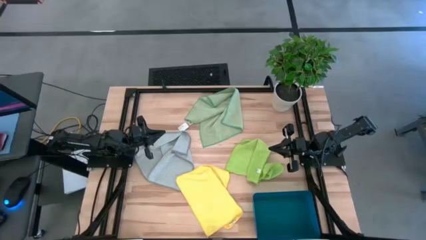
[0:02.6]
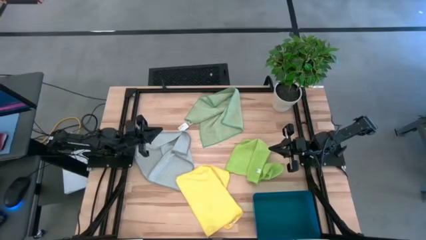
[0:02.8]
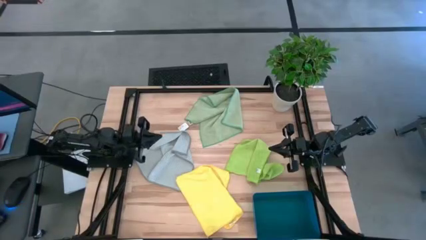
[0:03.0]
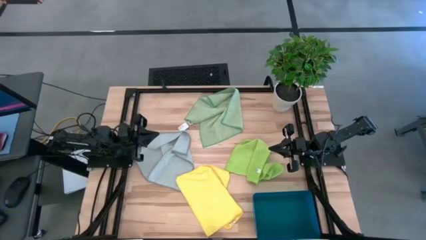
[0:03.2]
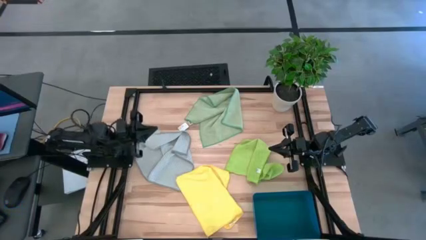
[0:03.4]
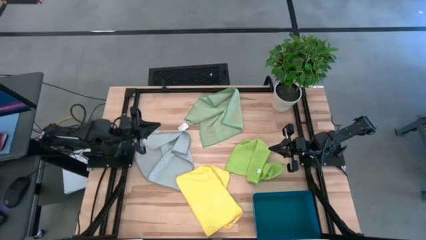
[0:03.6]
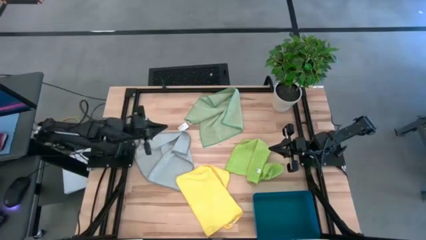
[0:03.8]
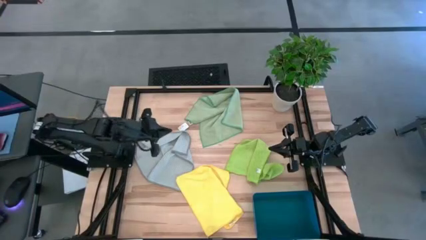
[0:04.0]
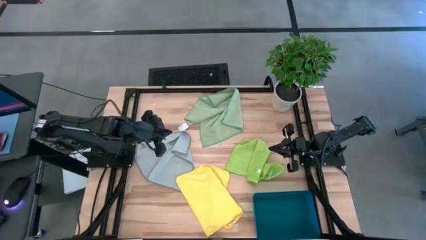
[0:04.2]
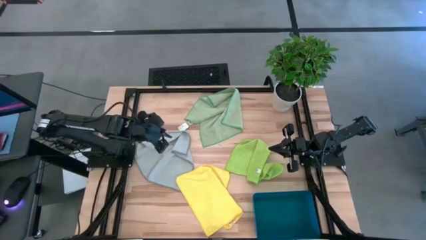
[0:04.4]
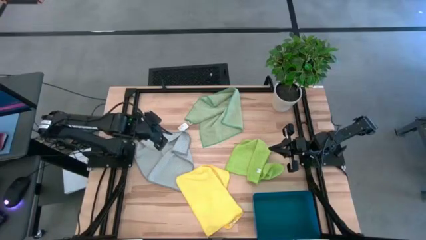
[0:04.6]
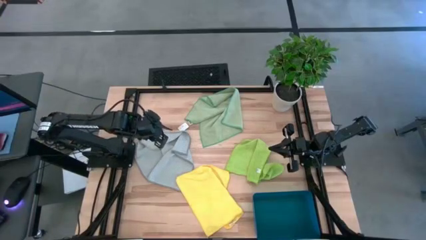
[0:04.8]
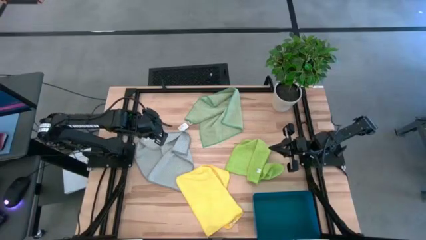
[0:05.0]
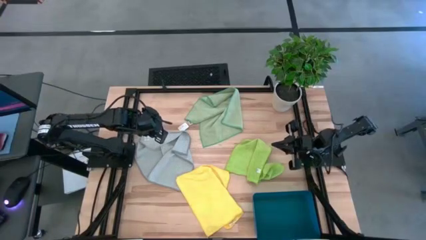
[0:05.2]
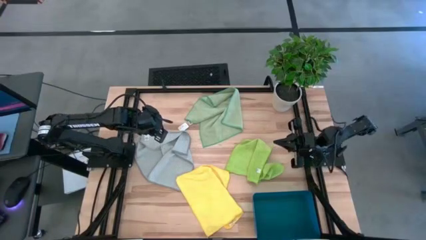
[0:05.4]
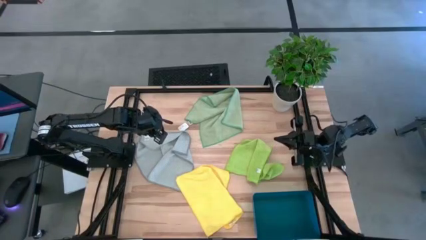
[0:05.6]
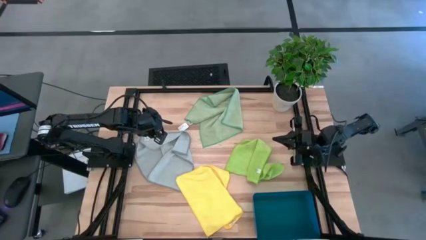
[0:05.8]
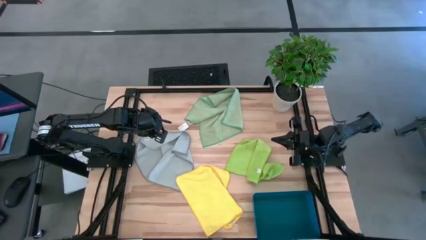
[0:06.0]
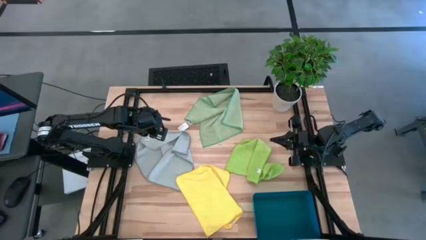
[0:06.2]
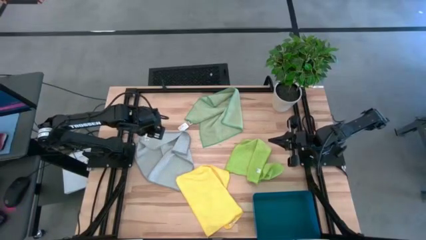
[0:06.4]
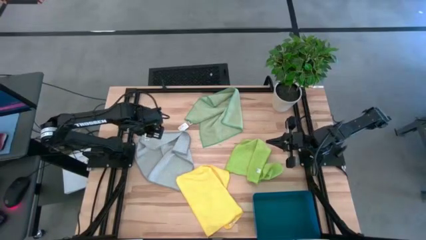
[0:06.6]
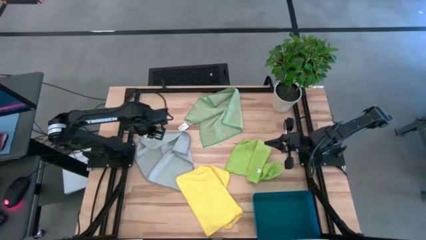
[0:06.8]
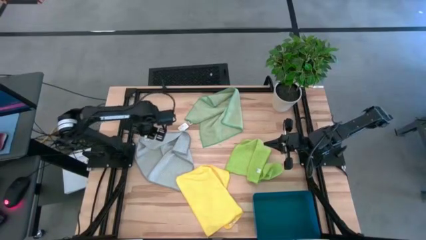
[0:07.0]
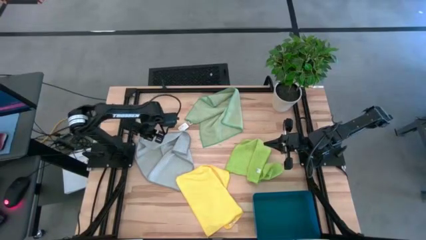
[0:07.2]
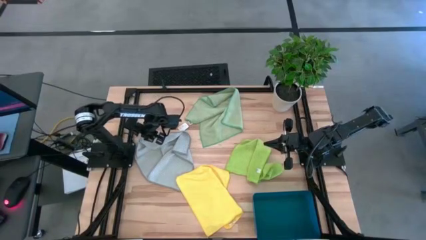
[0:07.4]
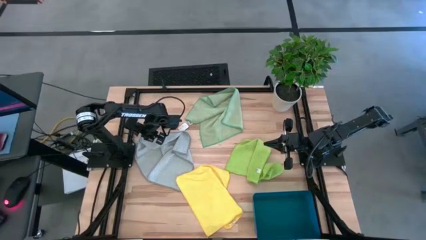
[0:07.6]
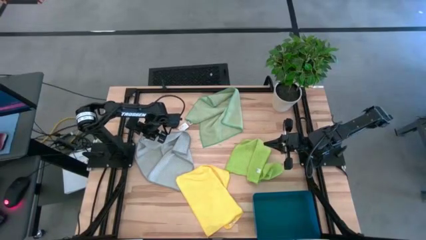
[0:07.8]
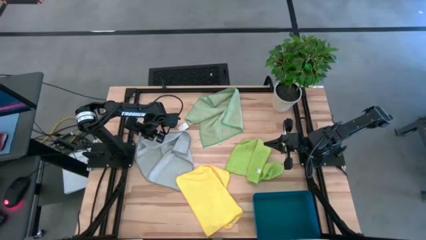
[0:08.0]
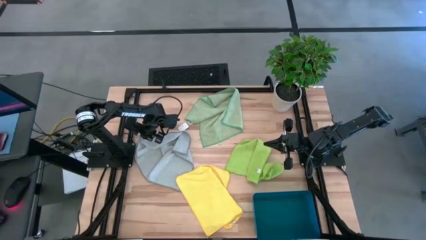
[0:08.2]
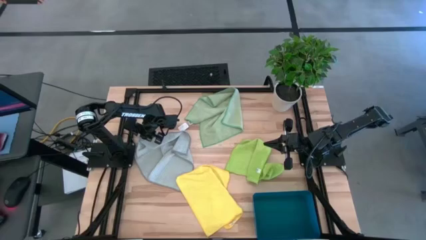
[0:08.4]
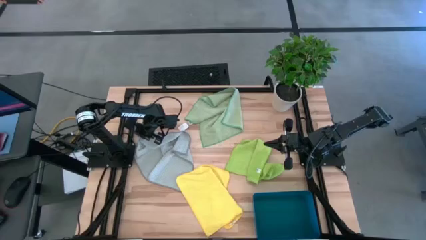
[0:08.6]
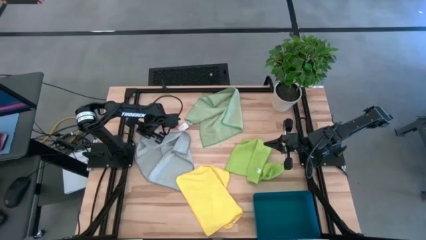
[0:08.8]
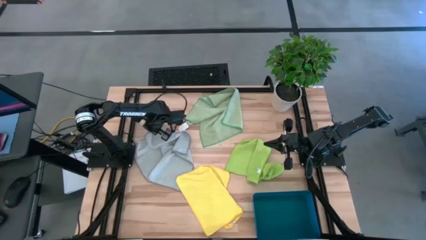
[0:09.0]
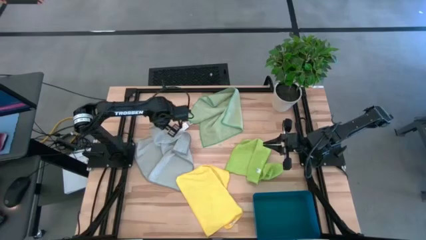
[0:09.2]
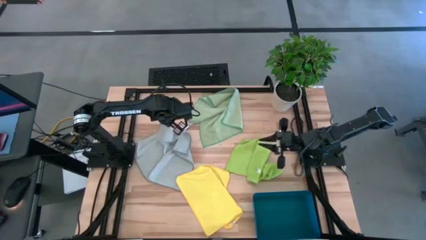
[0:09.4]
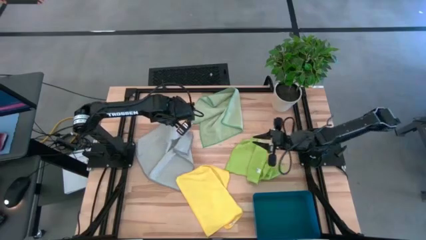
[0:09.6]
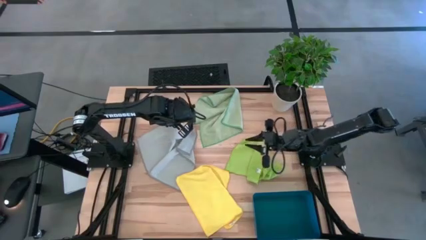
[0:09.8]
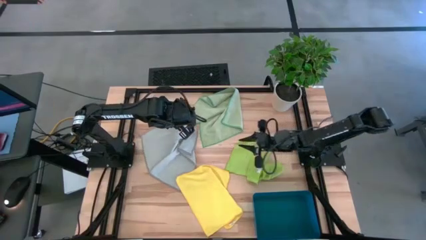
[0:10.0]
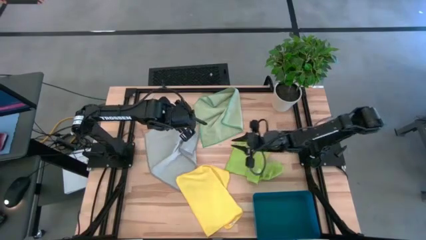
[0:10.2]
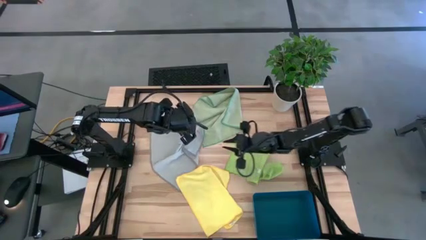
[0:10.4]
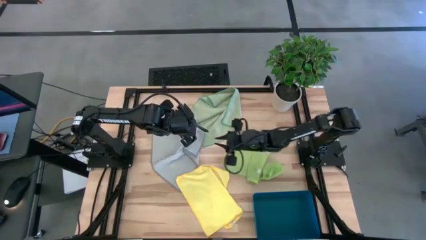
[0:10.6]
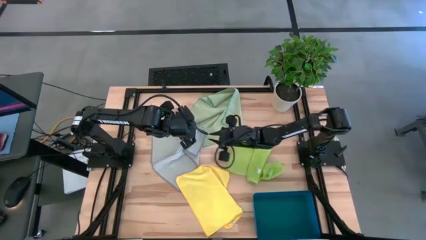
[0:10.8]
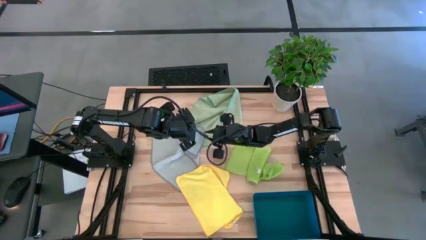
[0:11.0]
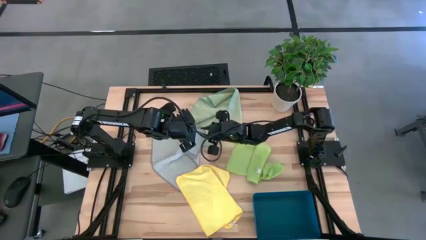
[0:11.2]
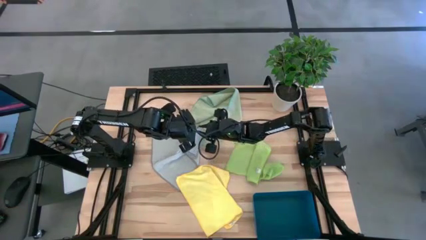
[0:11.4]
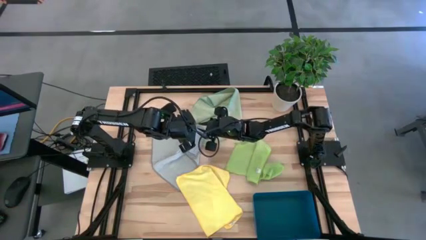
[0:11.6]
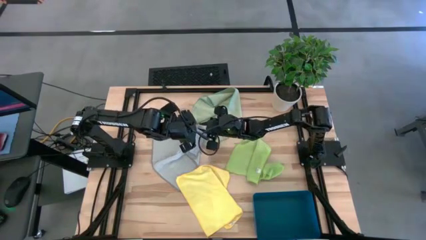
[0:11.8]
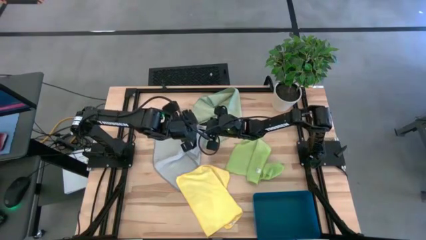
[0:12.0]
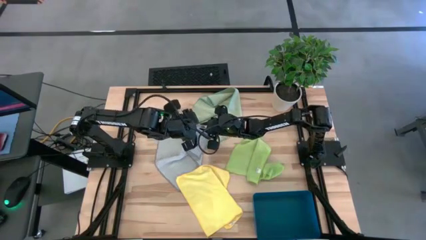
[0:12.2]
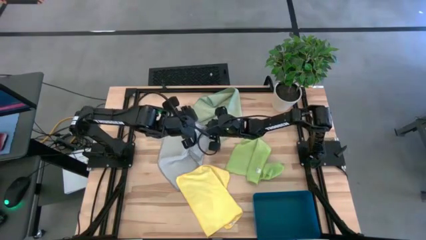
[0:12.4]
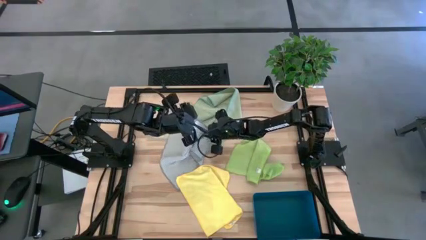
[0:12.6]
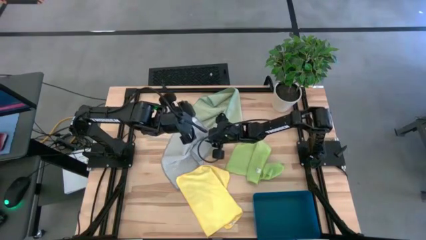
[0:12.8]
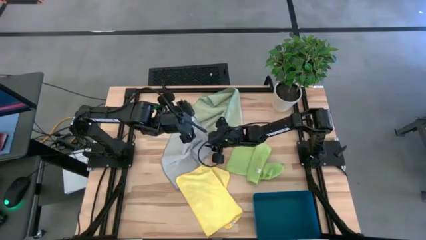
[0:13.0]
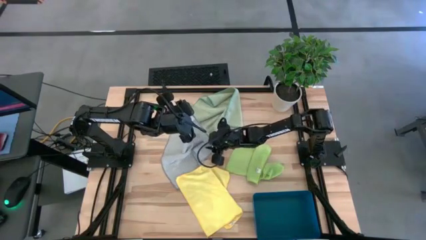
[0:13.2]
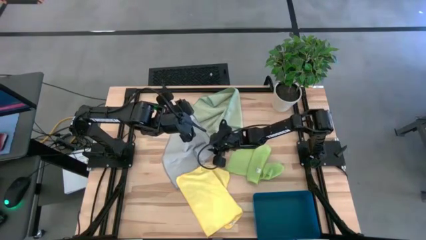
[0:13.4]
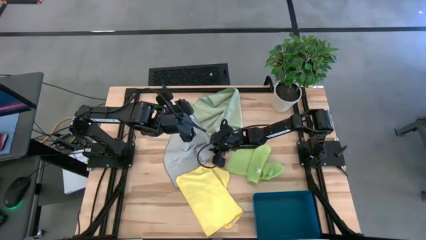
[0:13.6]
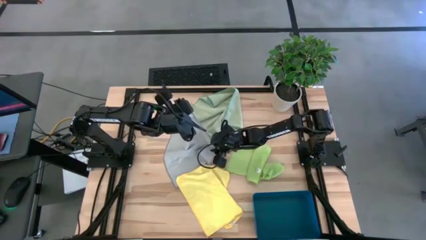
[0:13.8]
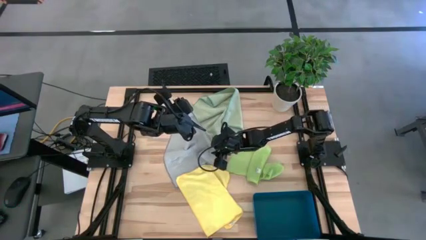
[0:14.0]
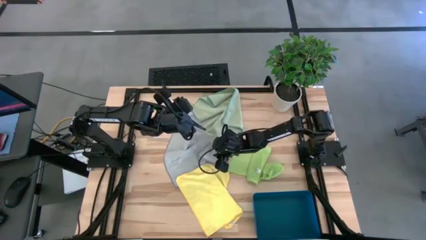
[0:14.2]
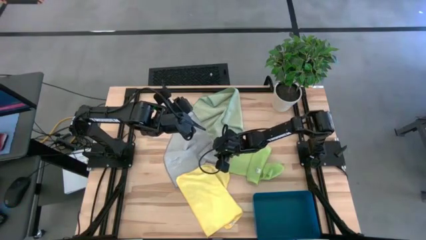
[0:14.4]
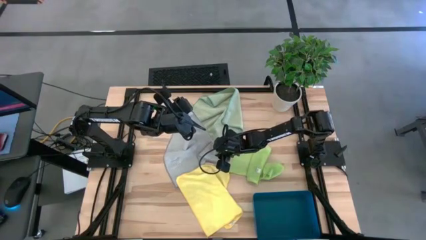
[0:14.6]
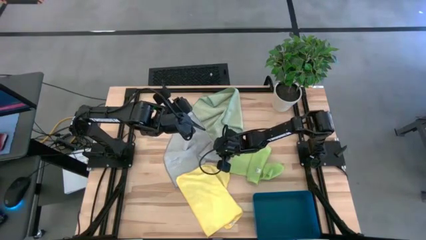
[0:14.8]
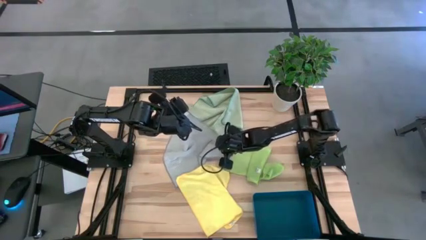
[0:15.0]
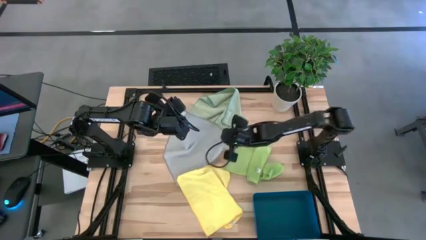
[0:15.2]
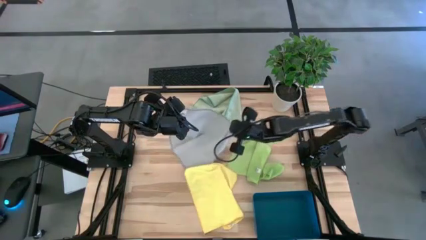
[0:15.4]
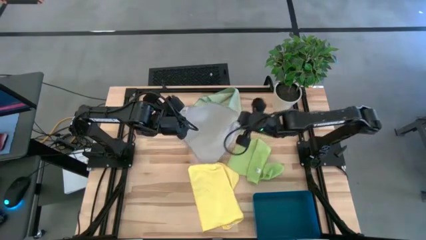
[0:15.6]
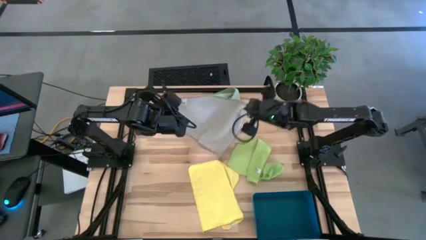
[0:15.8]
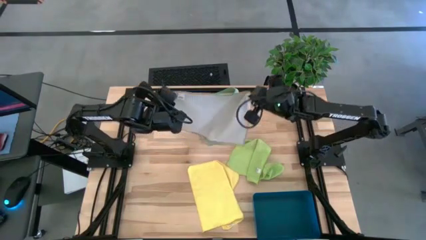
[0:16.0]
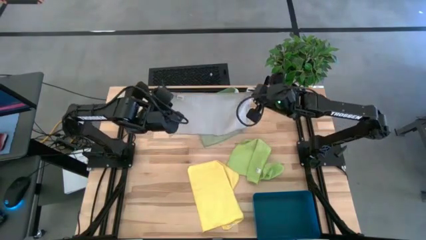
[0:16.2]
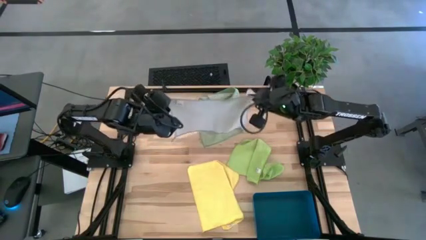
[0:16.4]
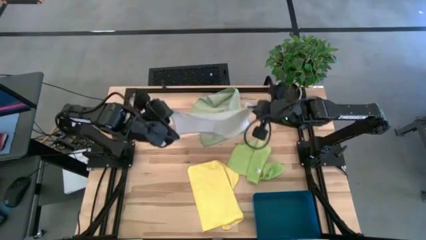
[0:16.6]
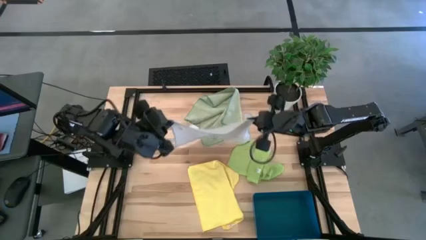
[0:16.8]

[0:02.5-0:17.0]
Task: Fold microfiber towels
Fold the gray towel
